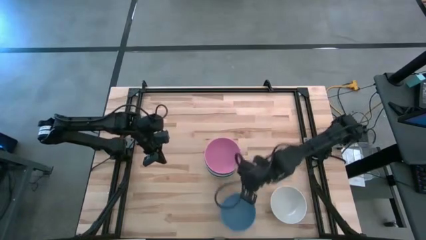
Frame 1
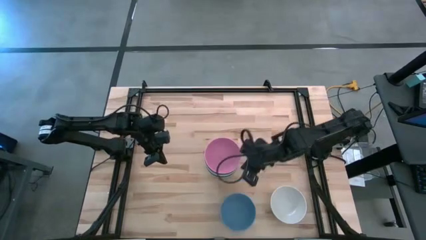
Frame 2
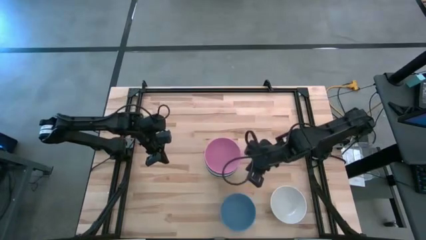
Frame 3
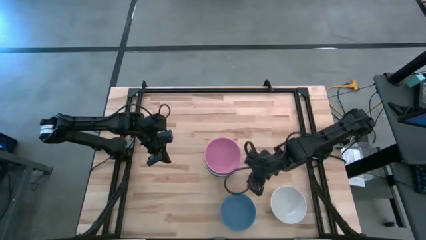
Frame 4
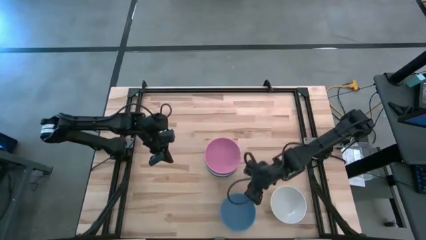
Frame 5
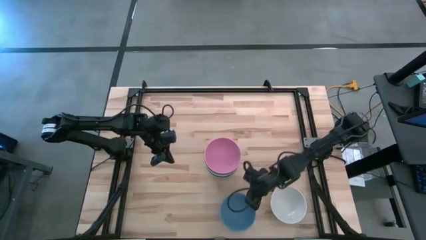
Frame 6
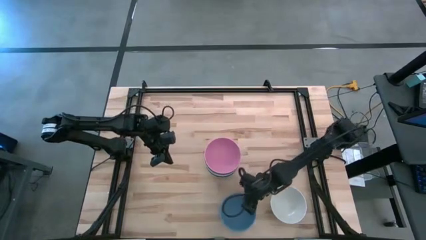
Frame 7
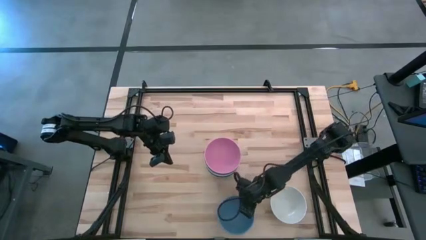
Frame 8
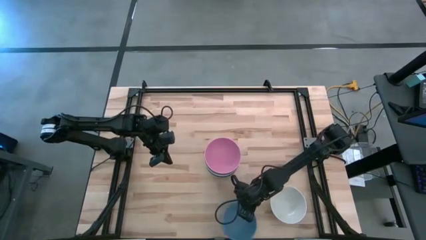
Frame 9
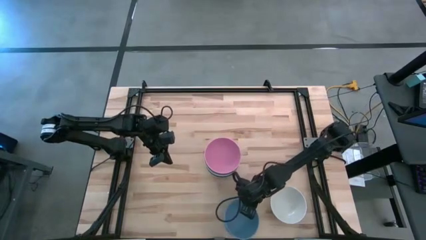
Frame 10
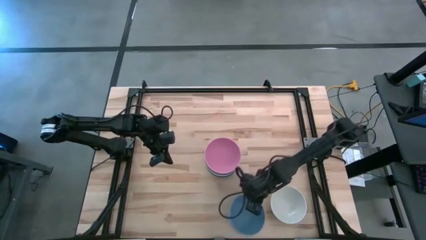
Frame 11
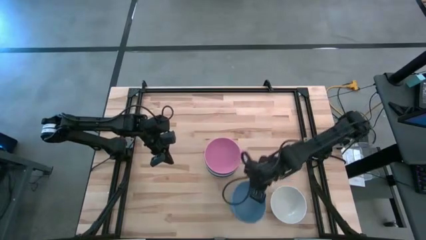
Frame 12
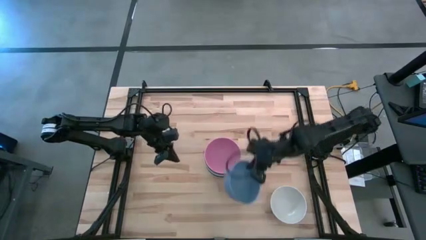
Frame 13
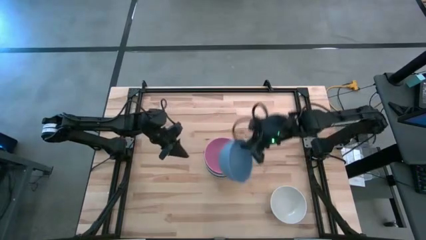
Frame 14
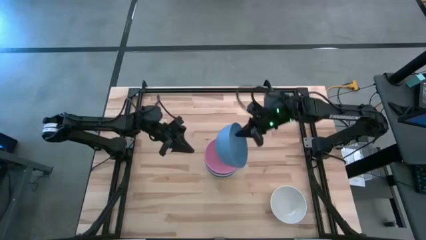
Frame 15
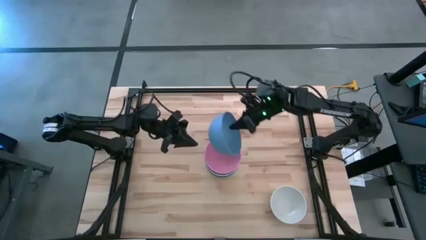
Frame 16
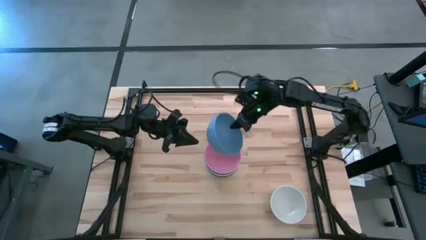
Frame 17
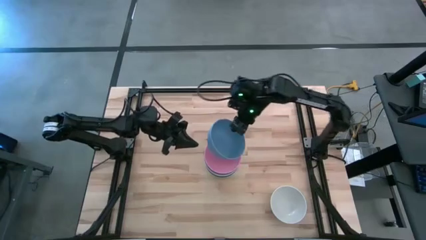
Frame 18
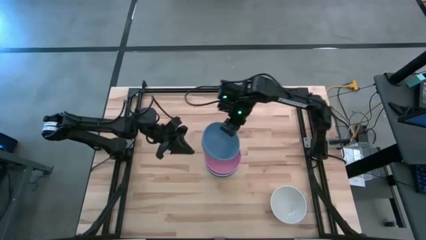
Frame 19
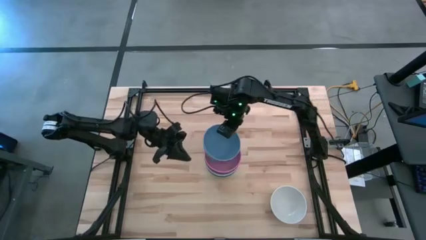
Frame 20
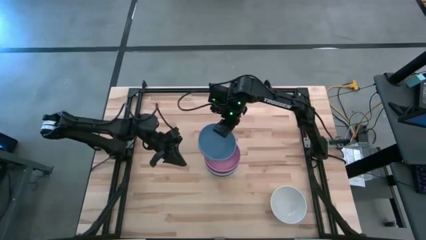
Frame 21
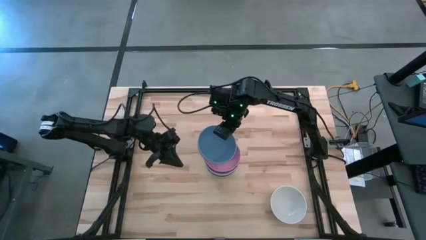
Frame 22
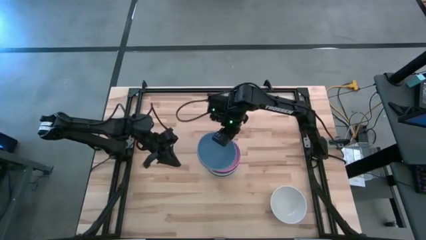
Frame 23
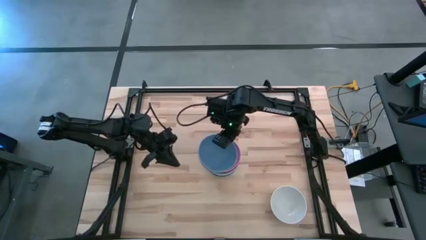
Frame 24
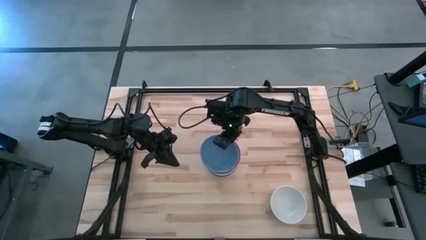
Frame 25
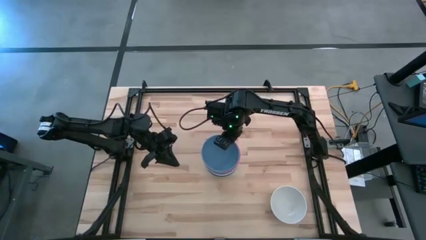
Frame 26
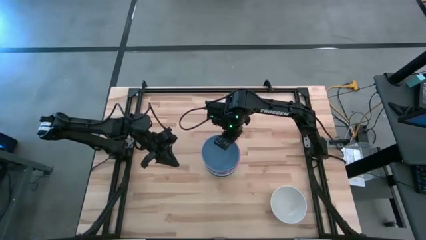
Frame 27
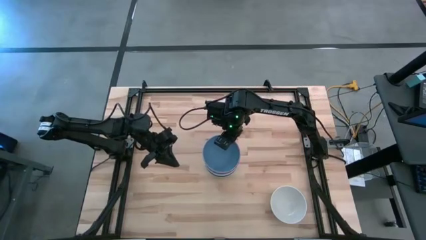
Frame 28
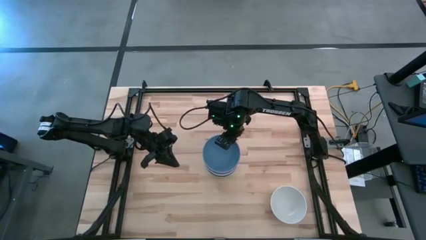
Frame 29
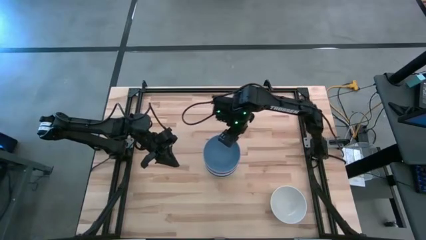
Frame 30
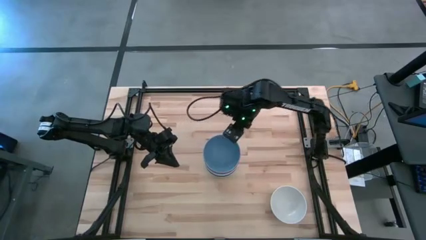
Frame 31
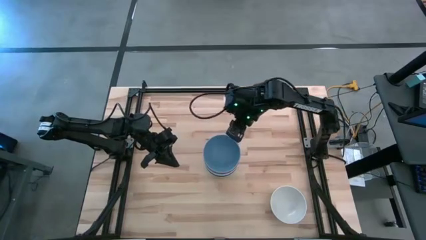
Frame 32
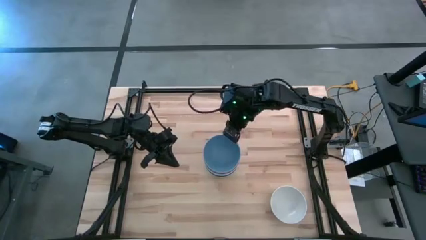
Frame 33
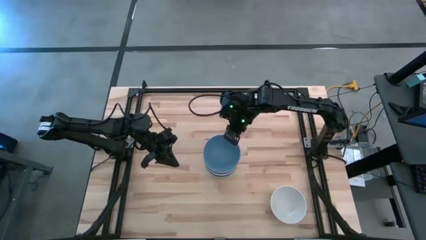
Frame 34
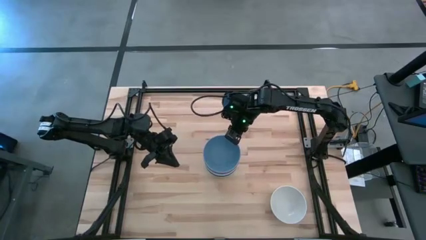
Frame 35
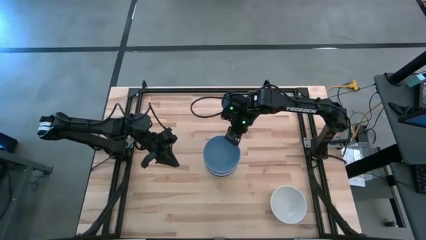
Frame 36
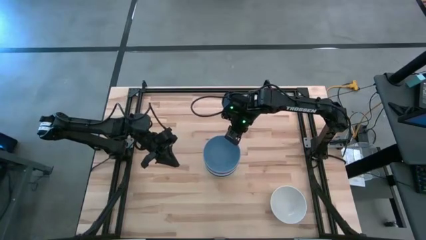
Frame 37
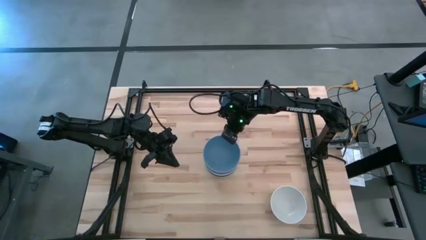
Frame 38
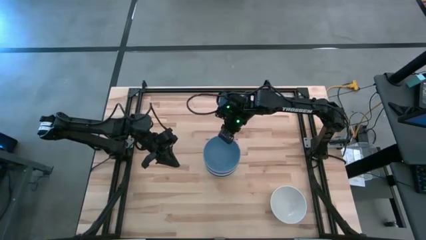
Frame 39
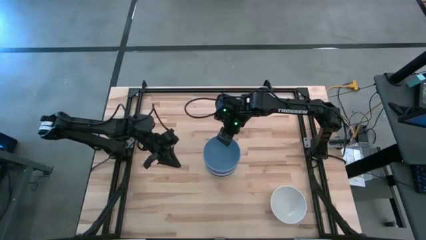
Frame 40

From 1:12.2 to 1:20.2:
Task: Nest bowls inside each other
Stack the blue bowl on the pink bowl

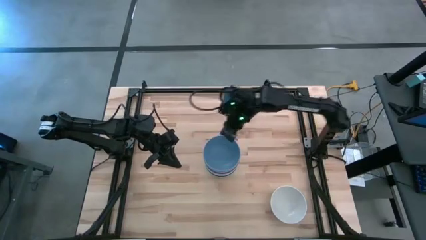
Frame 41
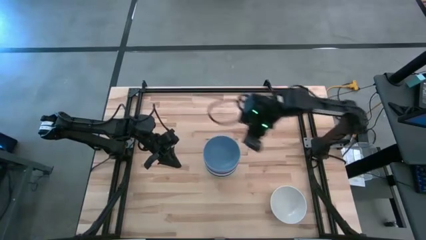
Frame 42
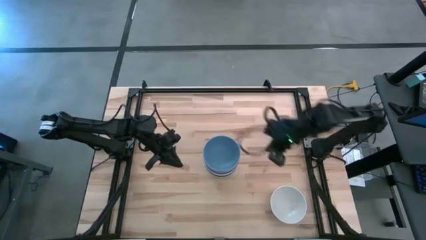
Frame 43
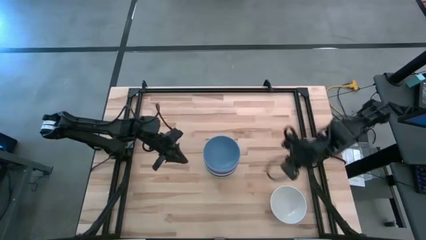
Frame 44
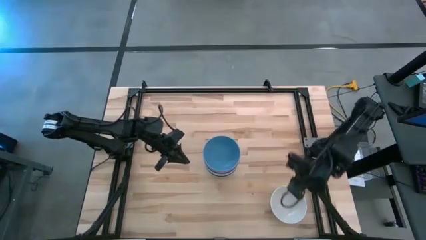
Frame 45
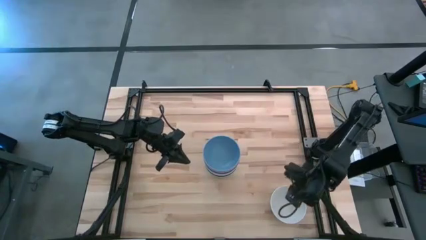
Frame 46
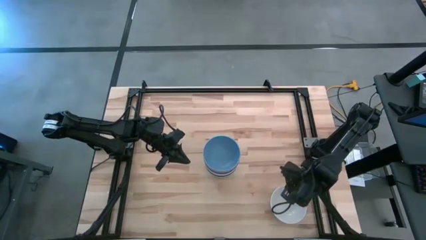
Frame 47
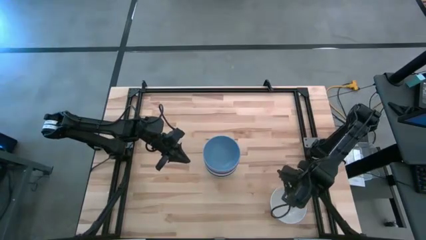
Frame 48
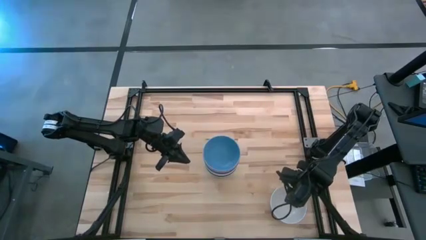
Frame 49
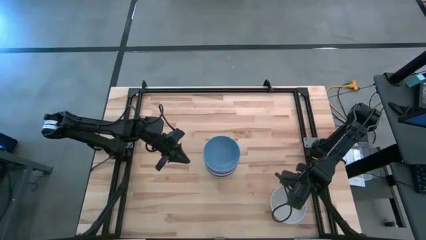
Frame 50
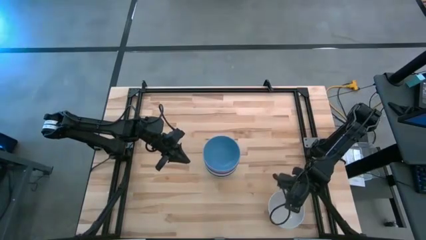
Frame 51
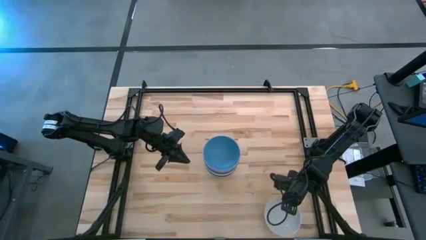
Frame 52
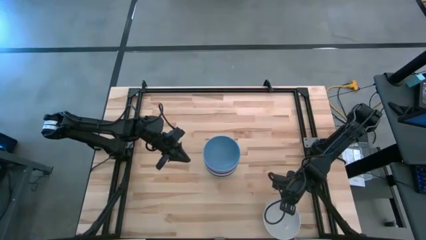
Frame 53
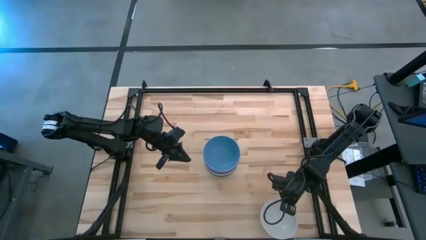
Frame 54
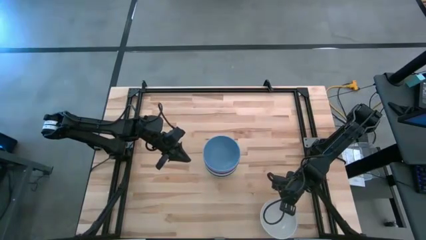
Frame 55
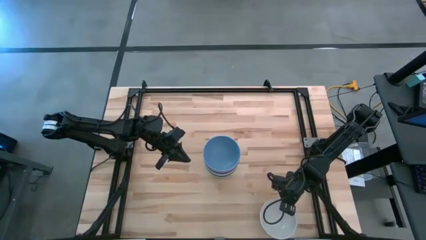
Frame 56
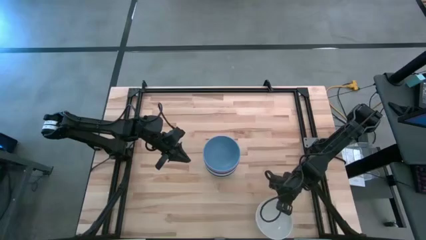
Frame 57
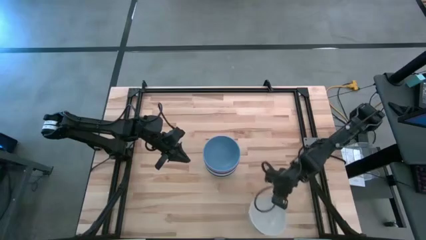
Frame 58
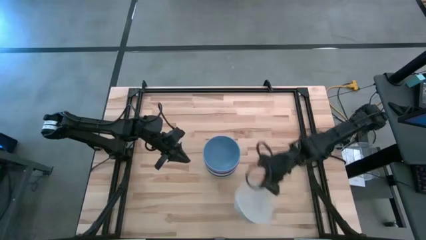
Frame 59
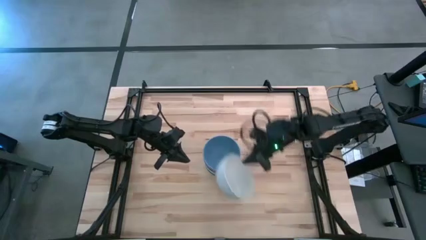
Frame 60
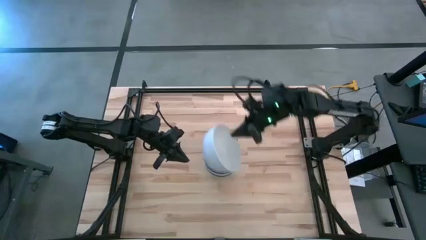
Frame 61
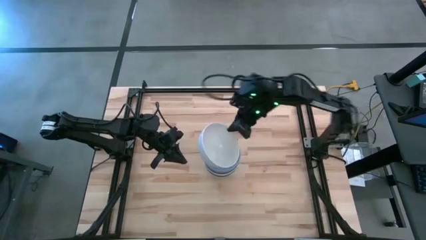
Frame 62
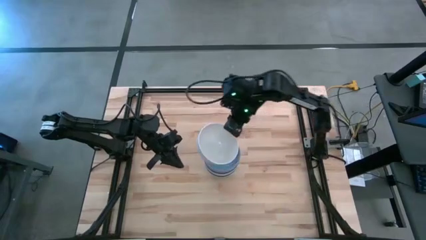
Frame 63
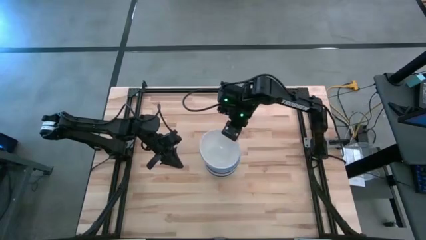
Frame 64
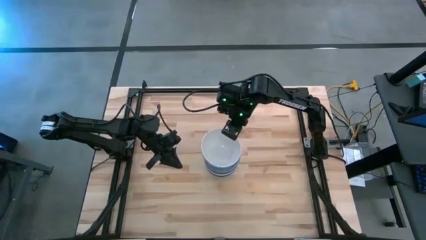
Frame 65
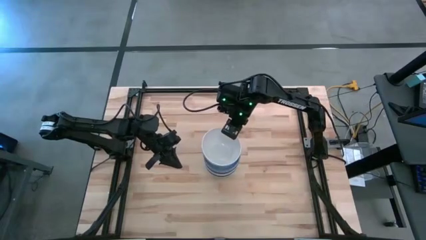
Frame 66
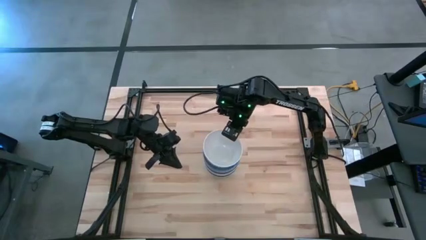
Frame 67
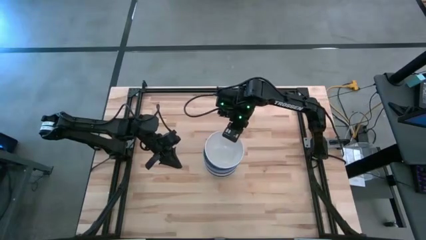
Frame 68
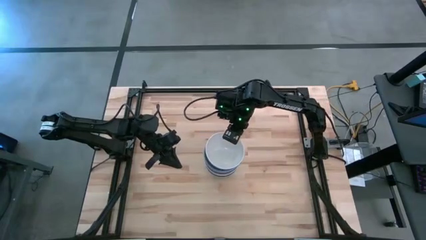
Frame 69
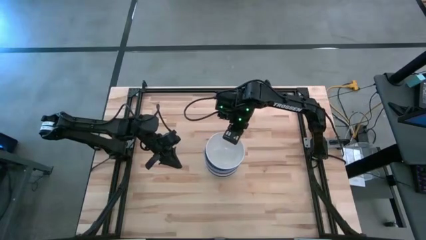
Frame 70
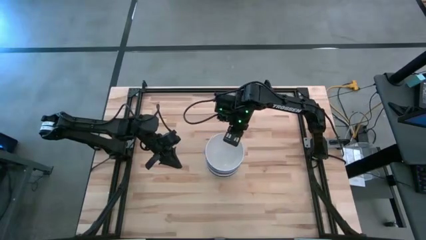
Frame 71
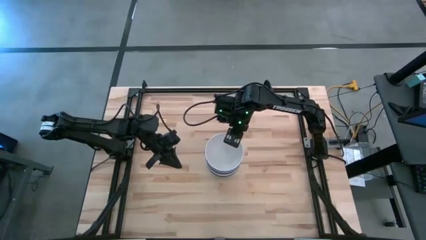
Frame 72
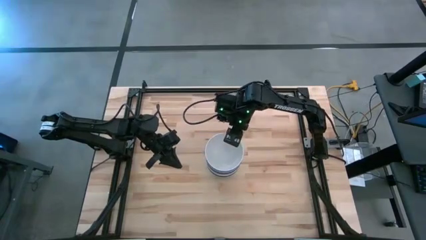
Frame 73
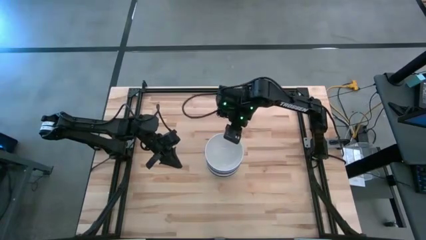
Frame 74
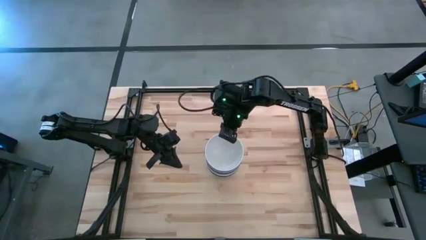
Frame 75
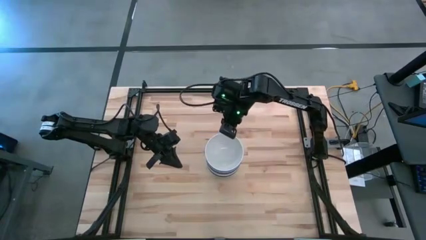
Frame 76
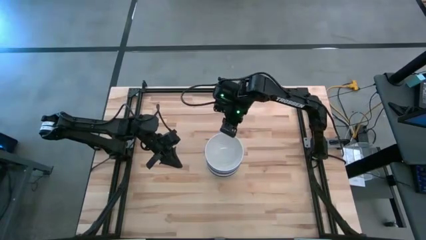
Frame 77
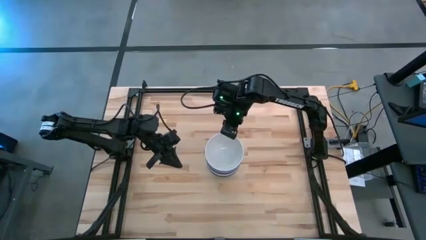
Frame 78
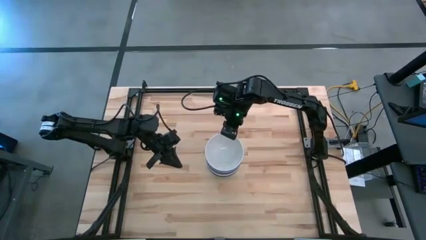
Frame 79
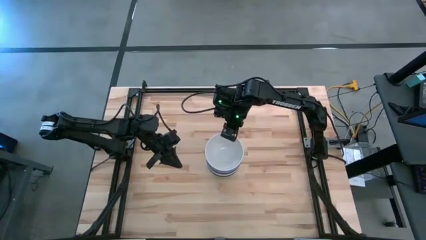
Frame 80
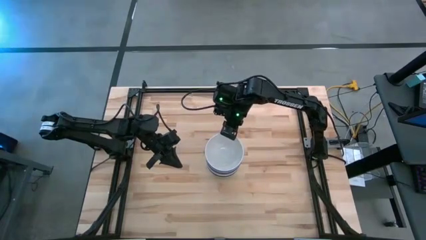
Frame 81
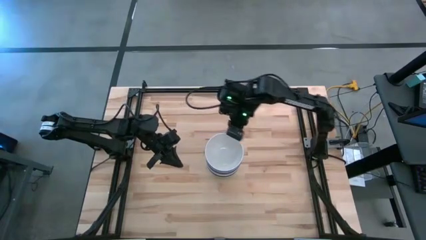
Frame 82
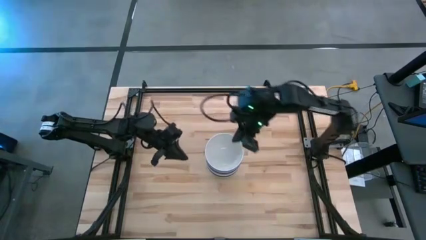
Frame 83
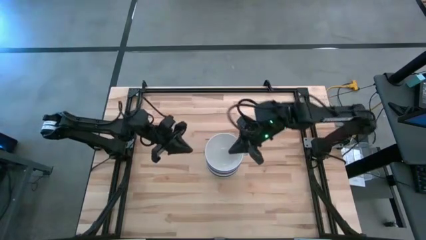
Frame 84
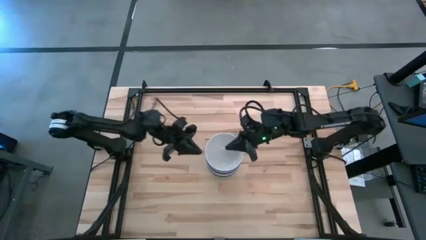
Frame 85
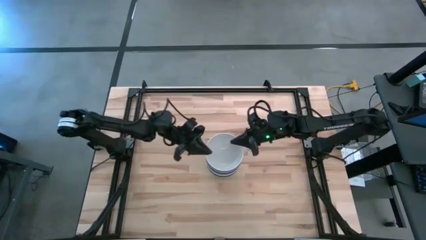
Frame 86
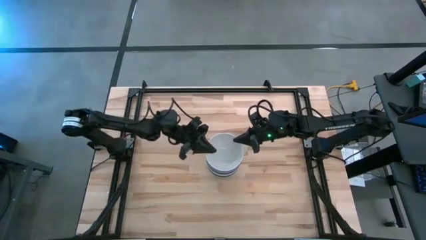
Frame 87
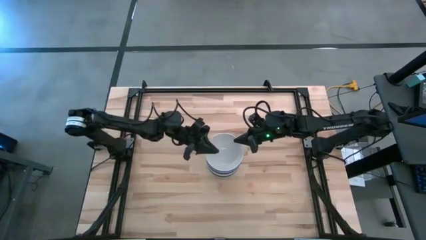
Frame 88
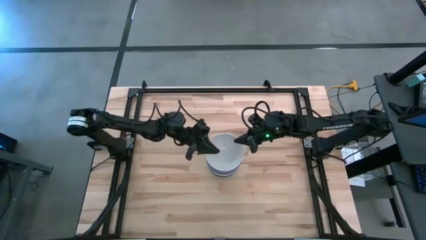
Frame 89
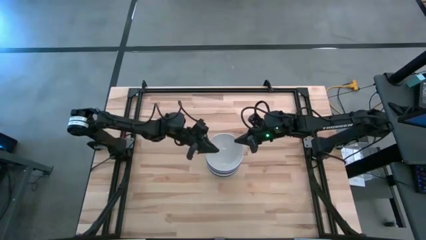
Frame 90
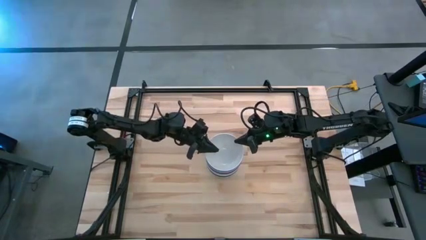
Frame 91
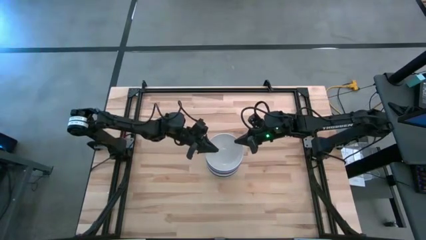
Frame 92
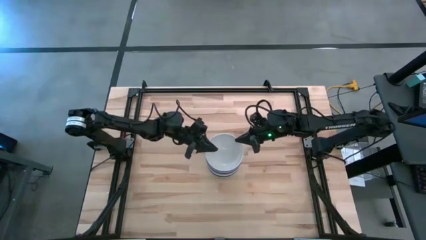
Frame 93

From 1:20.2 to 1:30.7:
Stack the white bowl on the blue bowl
